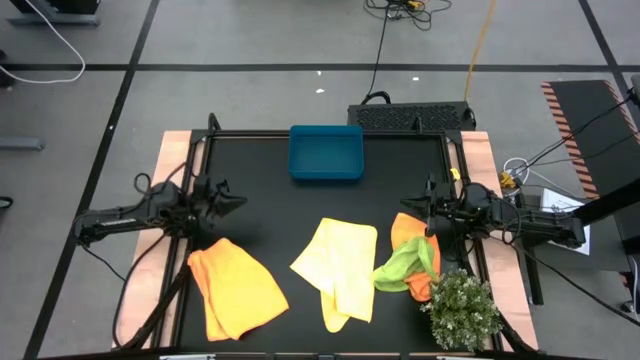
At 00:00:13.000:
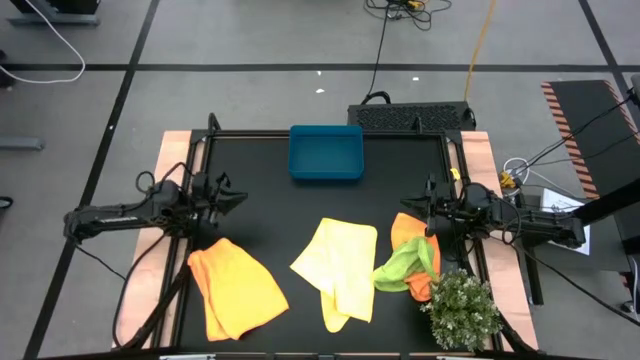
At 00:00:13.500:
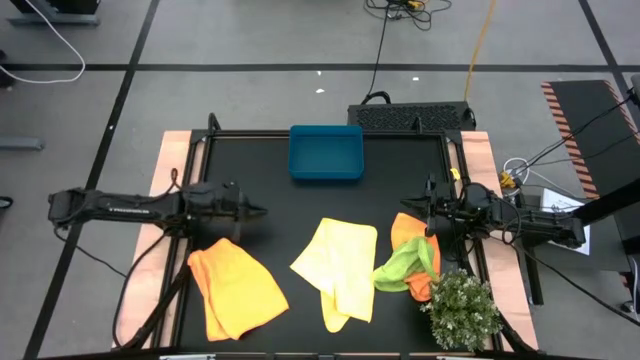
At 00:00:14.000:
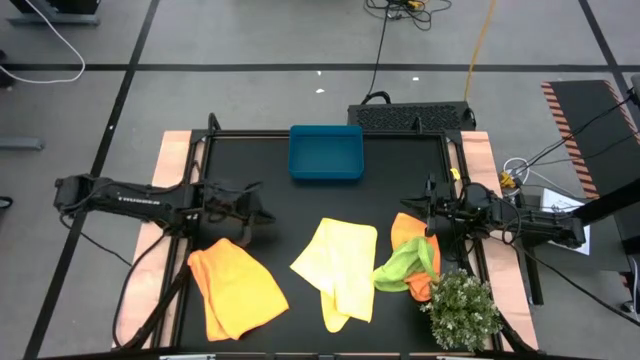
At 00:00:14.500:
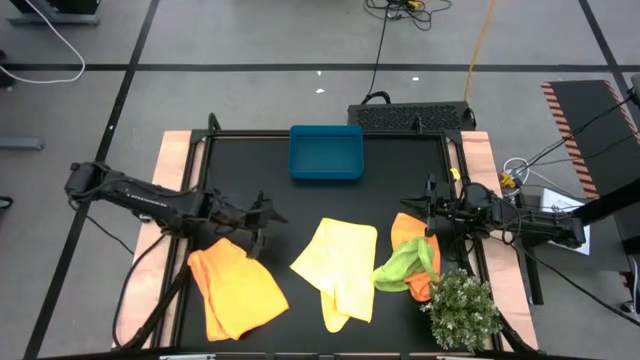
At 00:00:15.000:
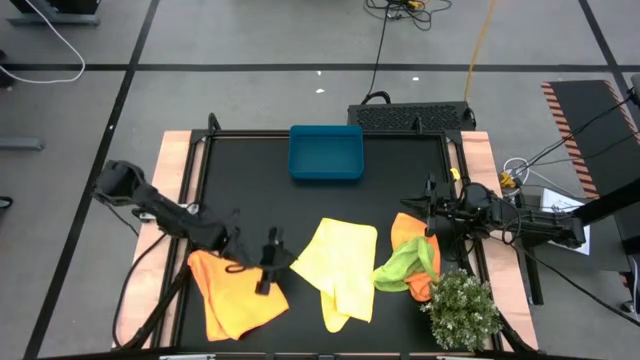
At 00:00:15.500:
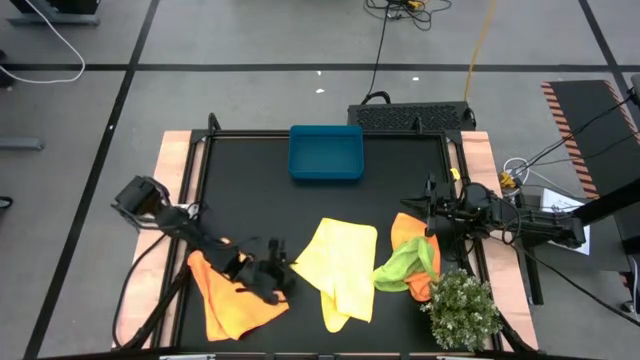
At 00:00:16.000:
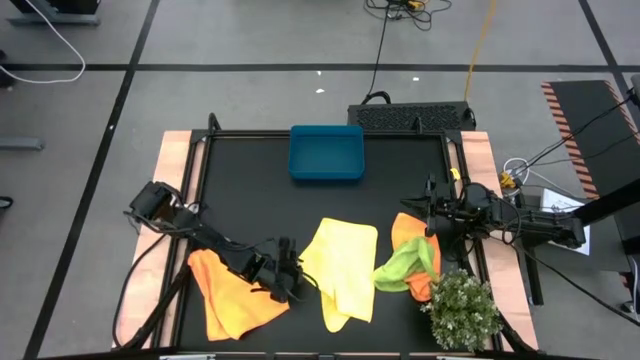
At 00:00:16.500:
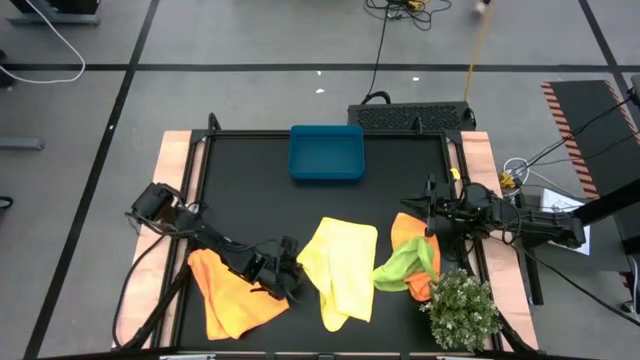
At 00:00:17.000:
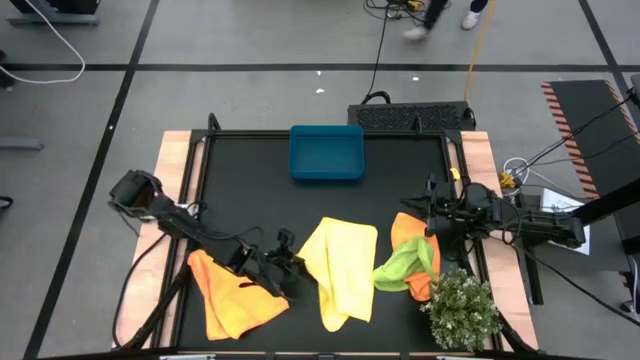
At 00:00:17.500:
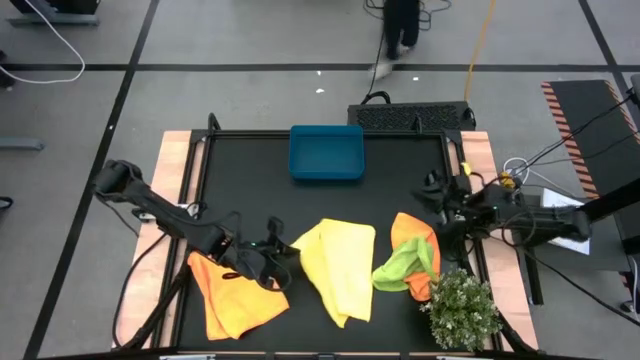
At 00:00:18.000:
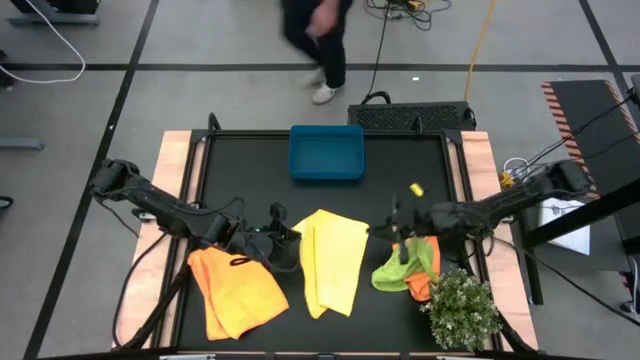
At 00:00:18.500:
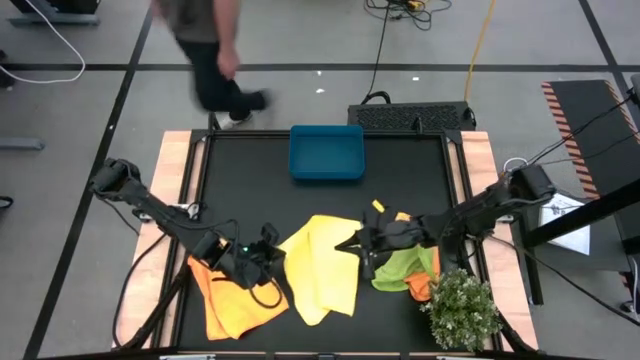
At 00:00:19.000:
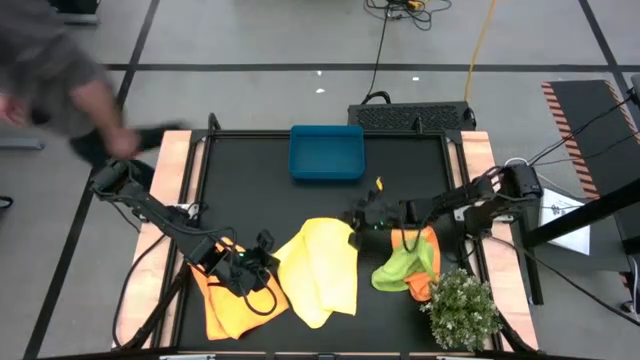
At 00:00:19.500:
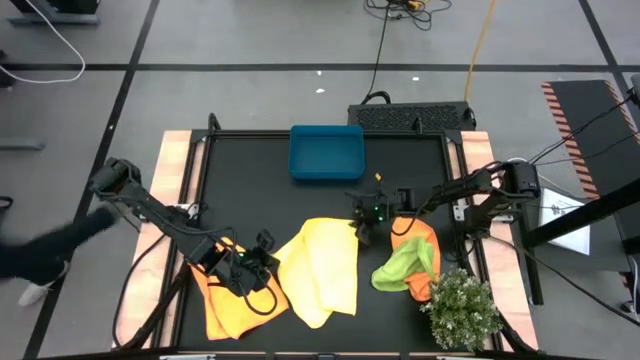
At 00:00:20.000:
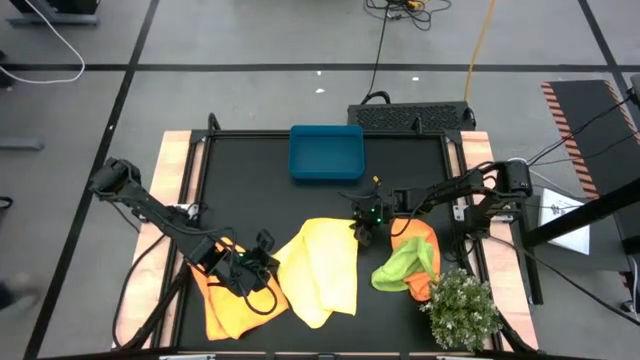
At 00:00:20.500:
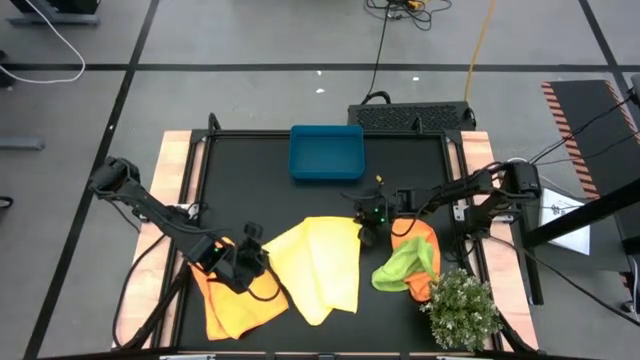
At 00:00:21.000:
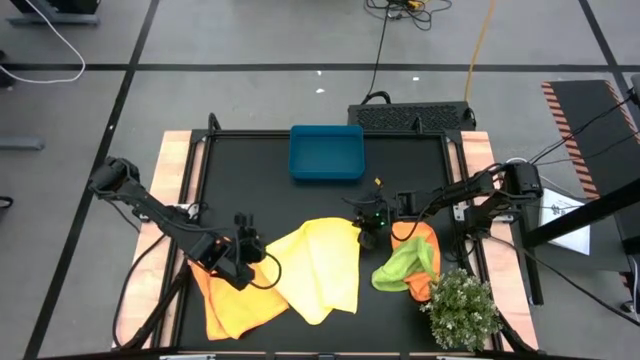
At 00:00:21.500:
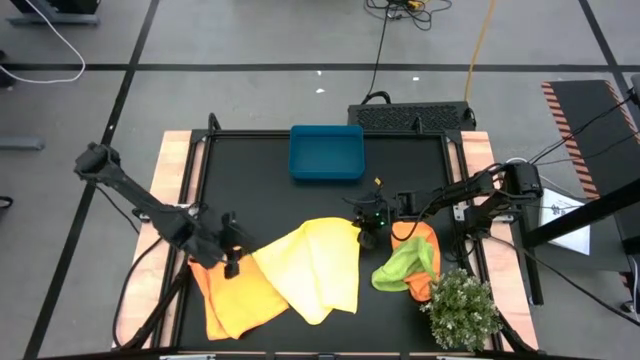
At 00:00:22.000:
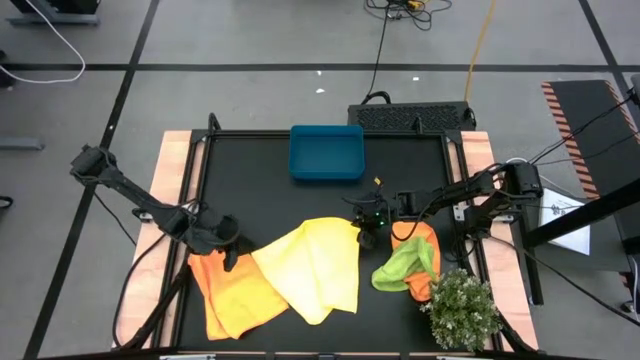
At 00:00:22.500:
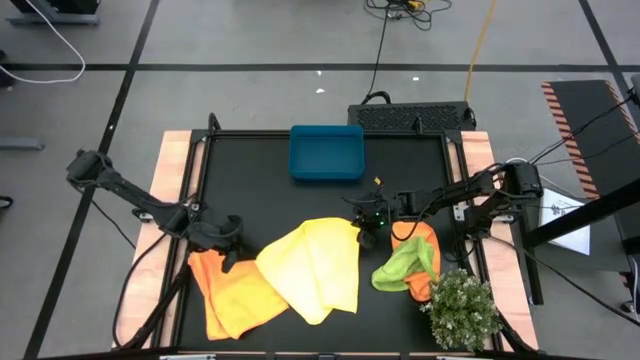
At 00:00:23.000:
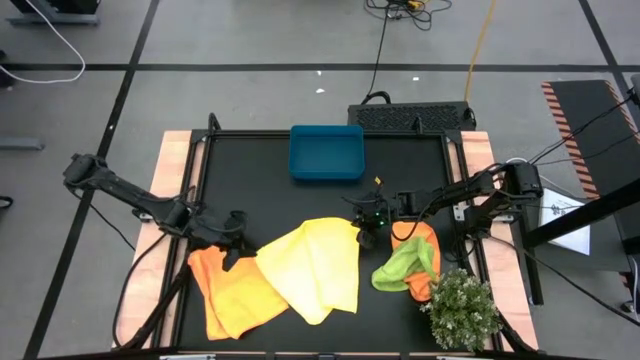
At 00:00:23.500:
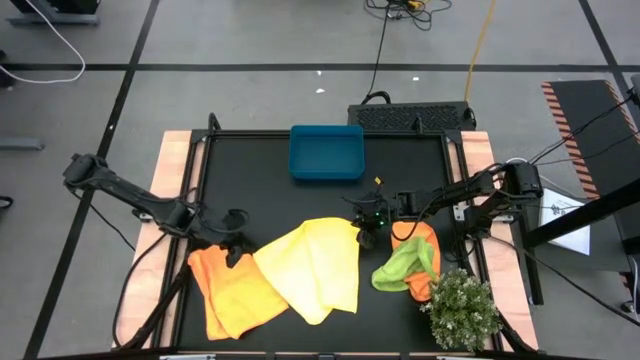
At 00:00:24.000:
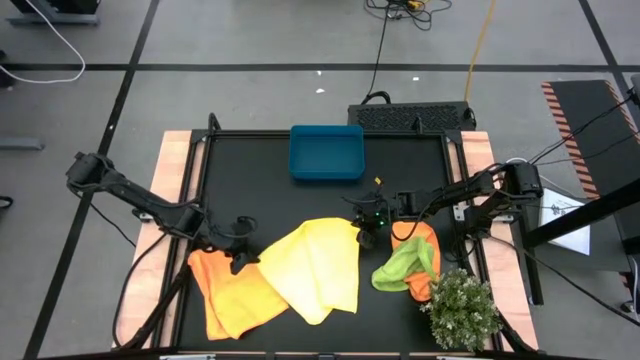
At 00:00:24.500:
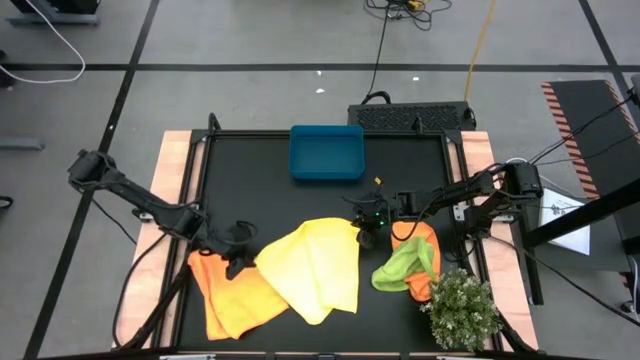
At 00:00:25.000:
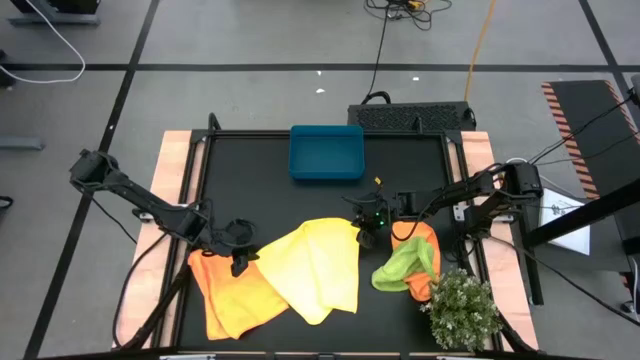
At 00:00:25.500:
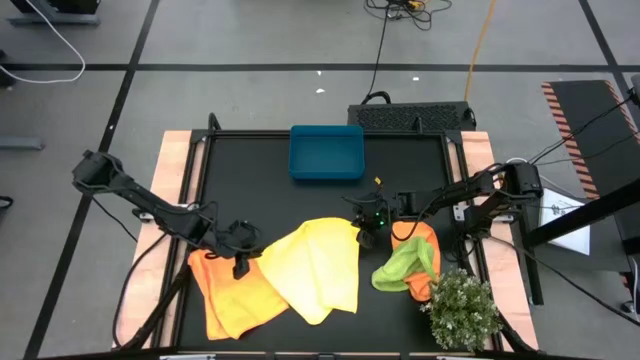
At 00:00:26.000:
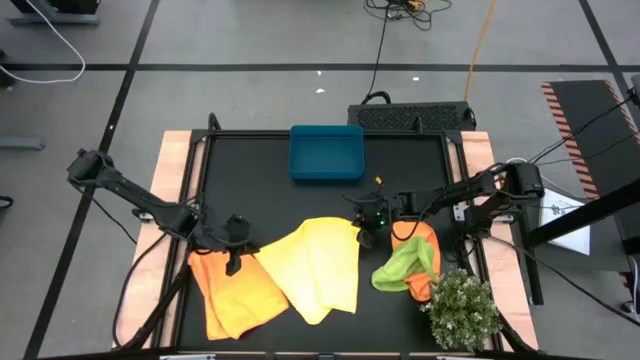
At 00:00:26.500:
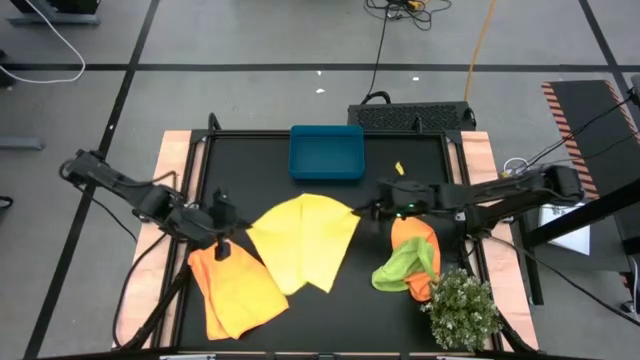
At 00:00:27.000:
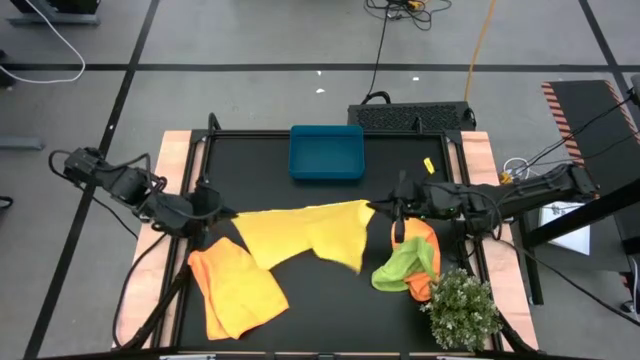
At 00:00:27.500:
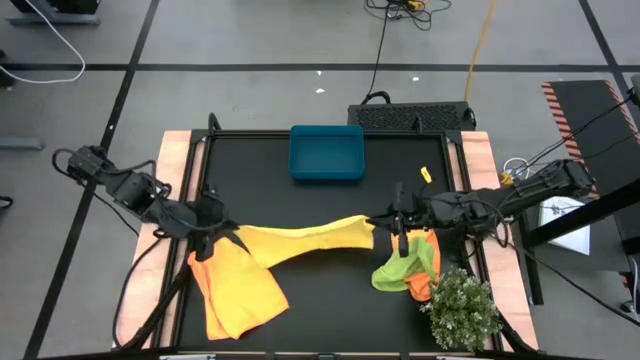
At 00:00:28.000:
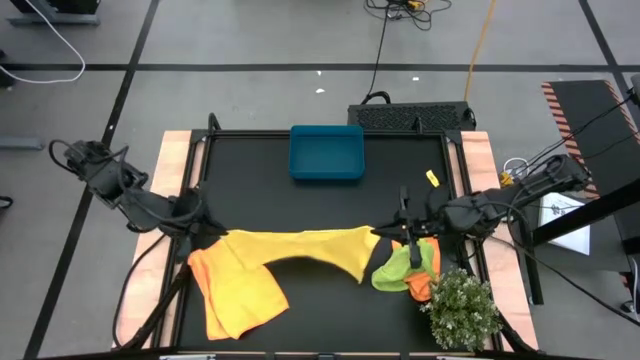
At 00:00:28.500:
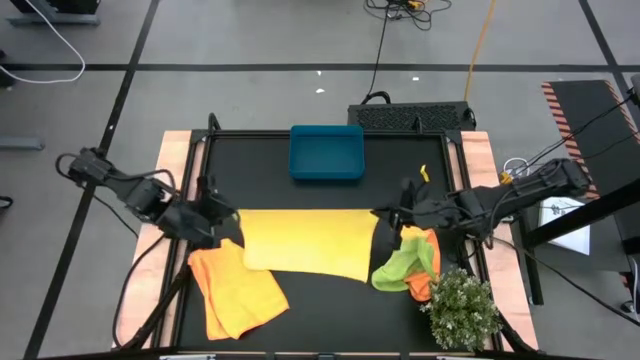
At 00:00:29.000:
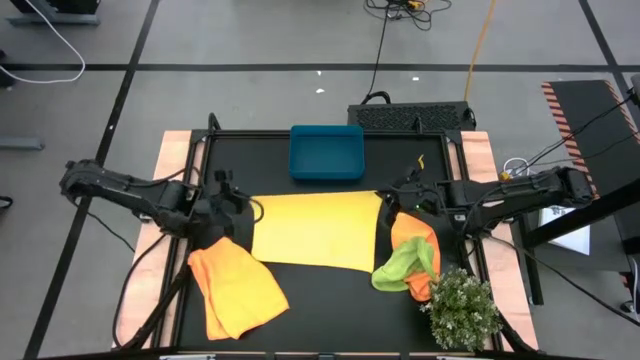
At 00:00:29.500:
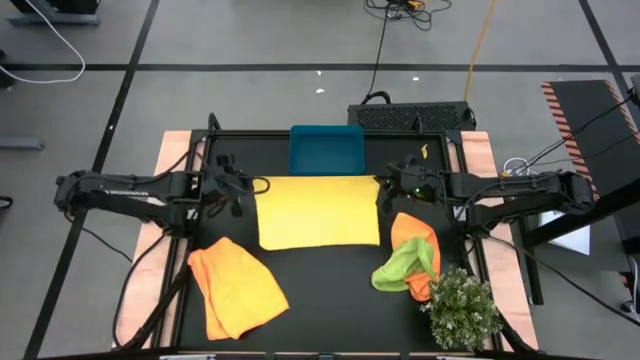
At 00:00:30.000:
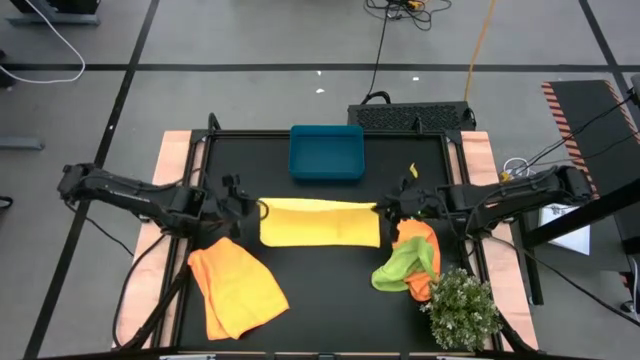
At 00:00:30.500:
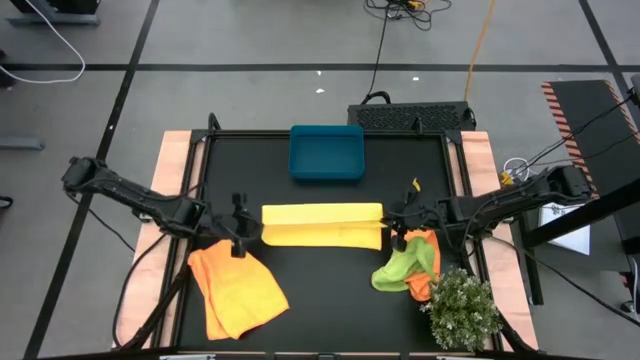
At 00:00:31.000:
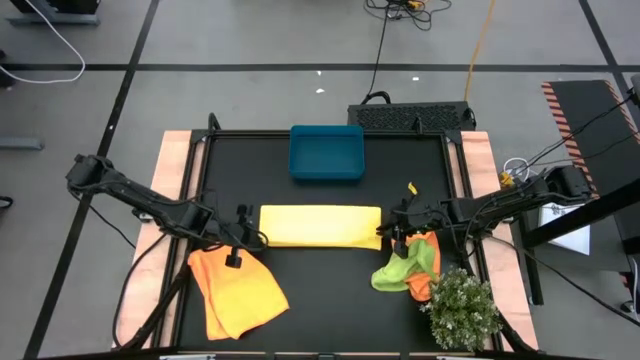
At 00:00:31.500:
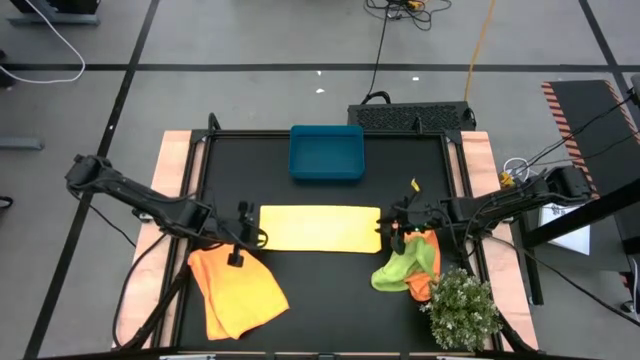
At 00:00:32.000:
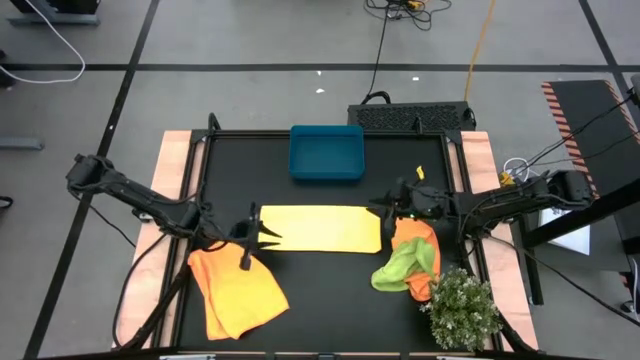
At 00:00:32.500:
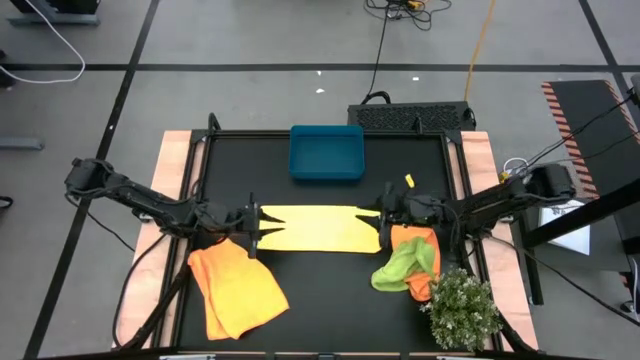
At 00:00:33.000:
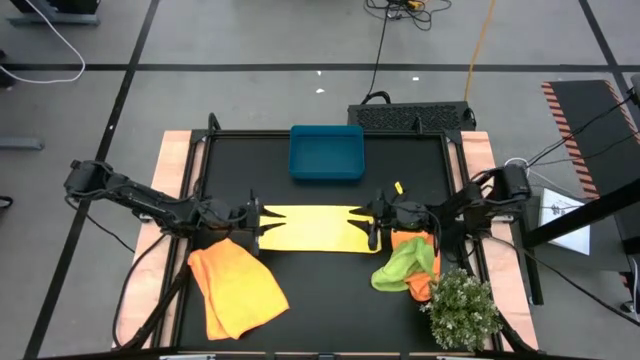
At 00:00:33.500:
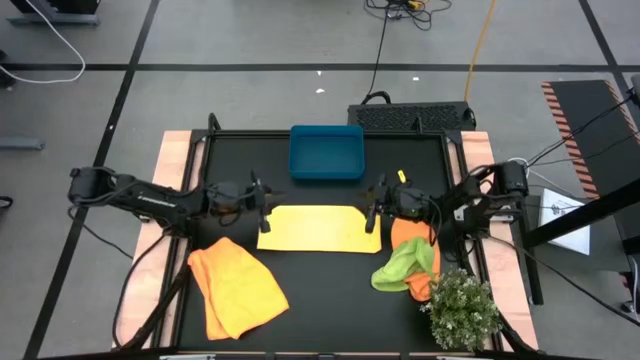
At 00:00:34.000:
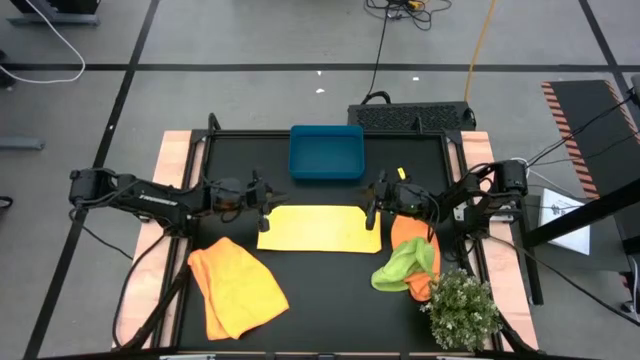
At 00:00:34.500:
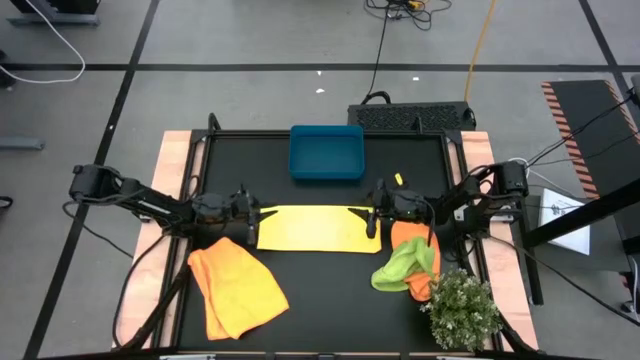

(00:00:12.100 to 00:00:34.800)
Task: Fold microfiber towels
Fold the yellow microfiber towel
